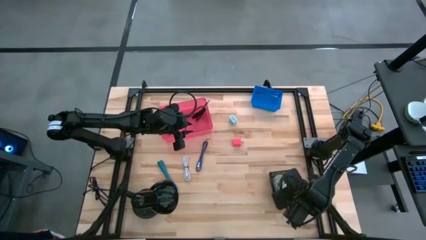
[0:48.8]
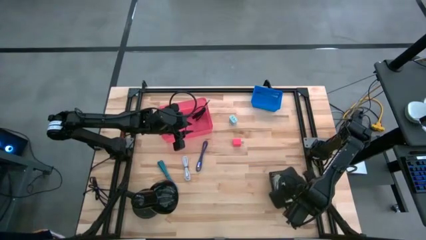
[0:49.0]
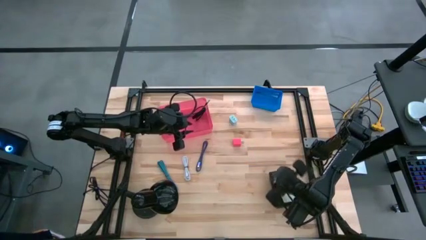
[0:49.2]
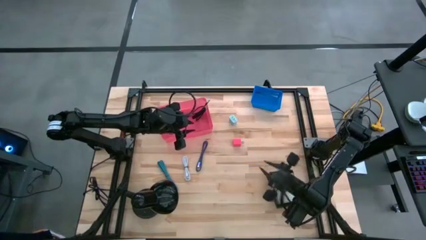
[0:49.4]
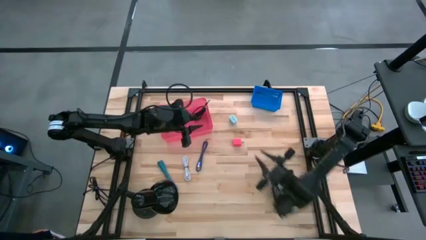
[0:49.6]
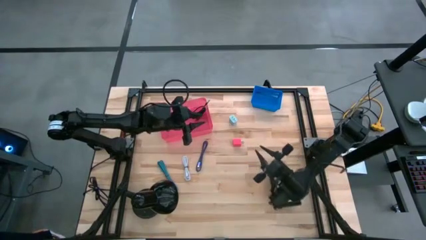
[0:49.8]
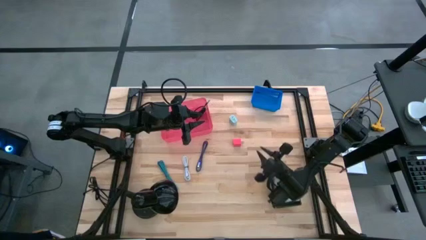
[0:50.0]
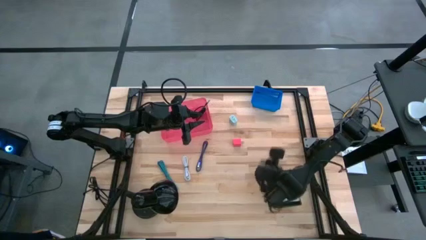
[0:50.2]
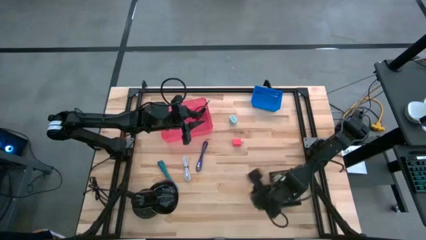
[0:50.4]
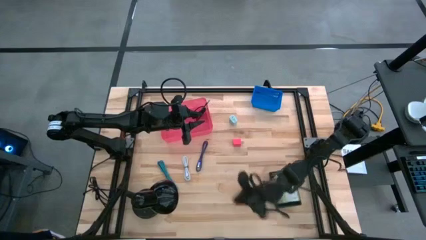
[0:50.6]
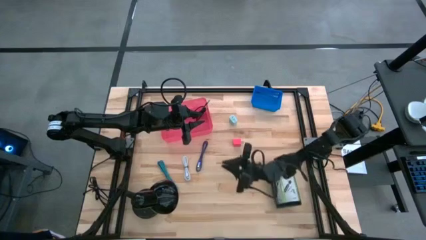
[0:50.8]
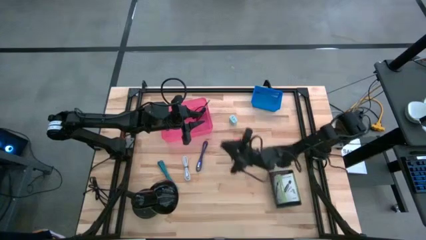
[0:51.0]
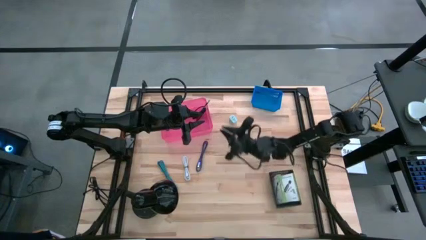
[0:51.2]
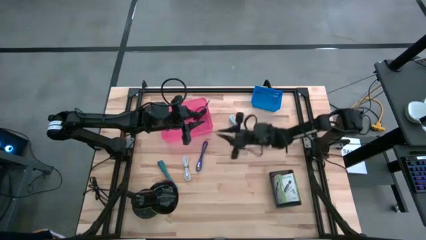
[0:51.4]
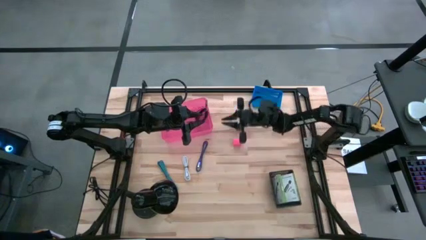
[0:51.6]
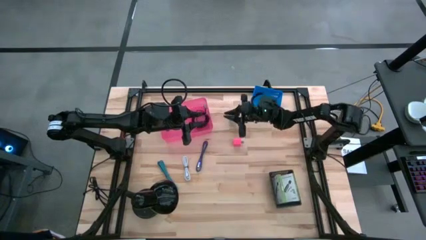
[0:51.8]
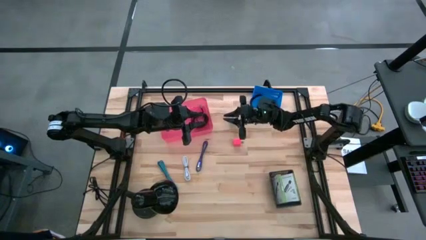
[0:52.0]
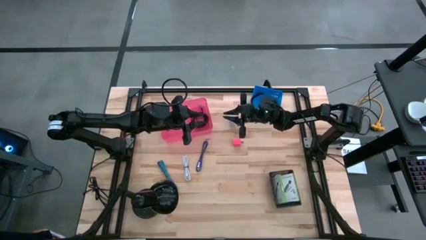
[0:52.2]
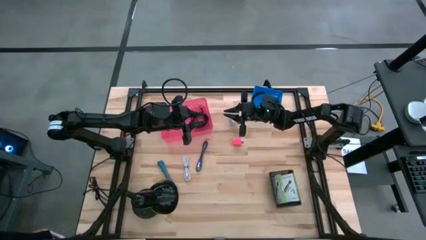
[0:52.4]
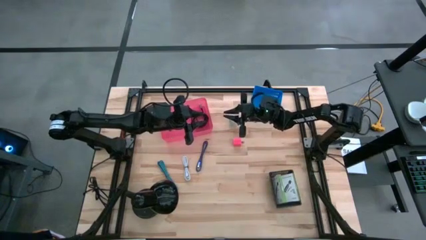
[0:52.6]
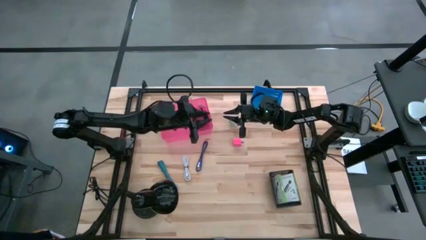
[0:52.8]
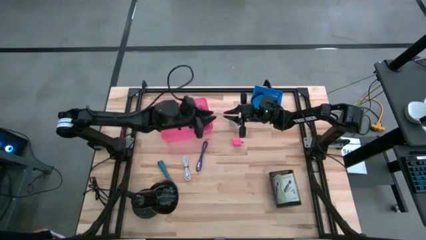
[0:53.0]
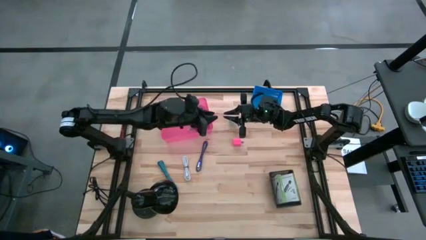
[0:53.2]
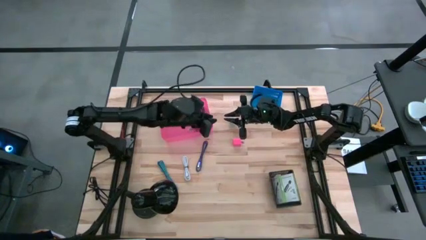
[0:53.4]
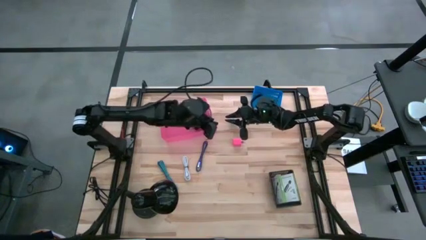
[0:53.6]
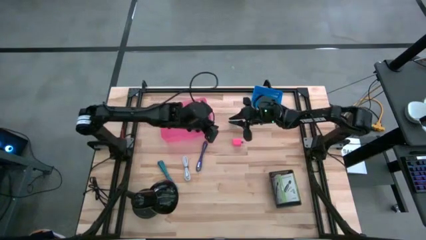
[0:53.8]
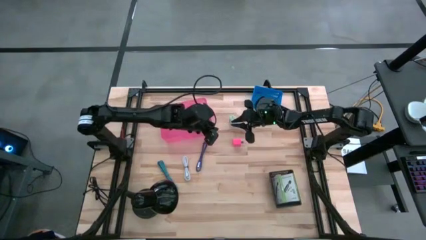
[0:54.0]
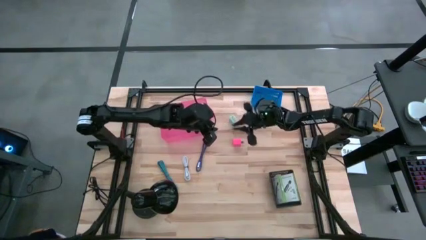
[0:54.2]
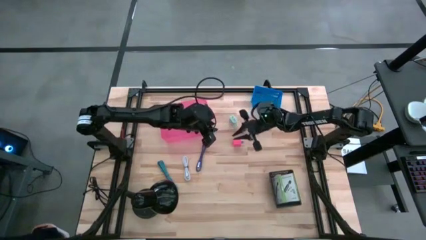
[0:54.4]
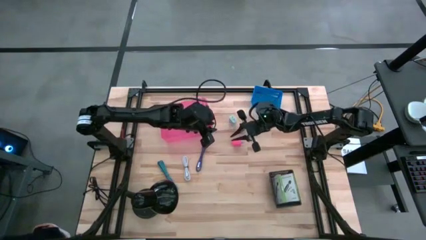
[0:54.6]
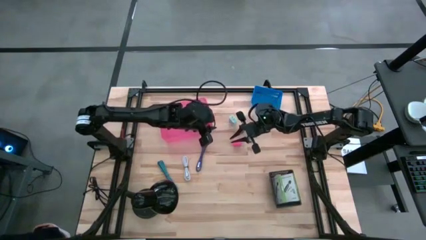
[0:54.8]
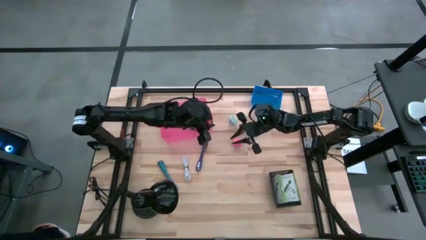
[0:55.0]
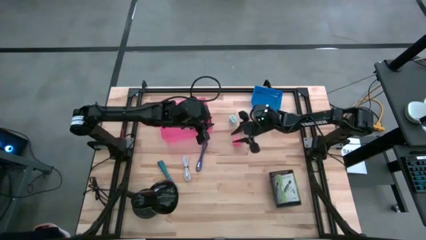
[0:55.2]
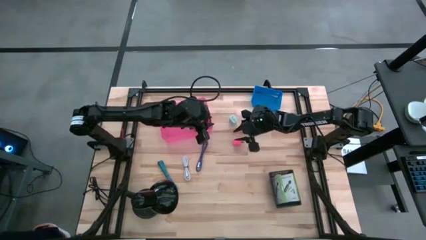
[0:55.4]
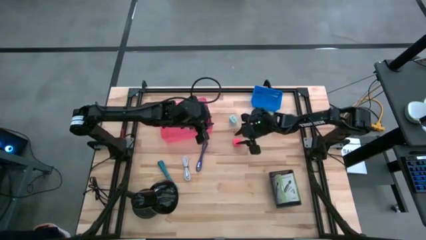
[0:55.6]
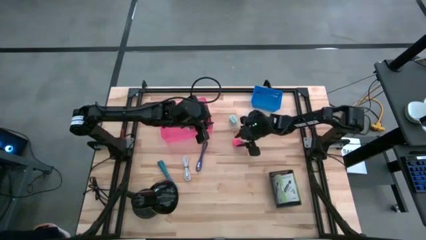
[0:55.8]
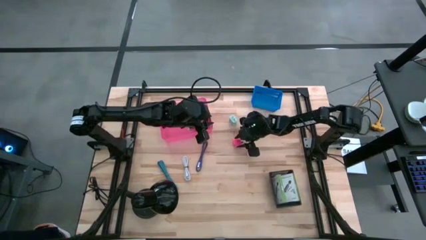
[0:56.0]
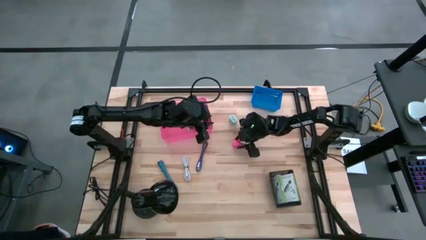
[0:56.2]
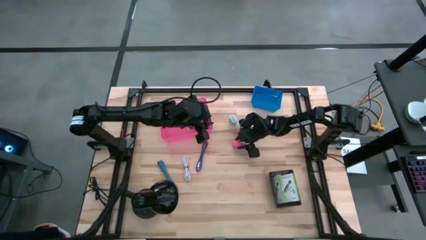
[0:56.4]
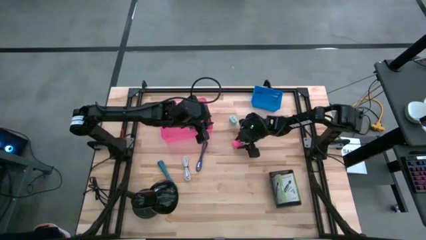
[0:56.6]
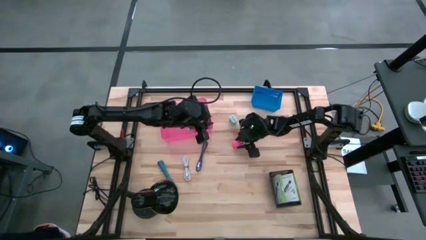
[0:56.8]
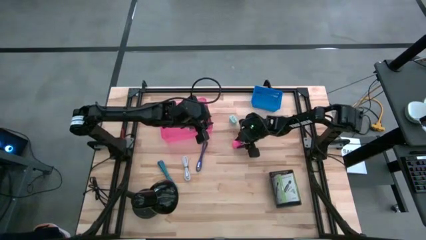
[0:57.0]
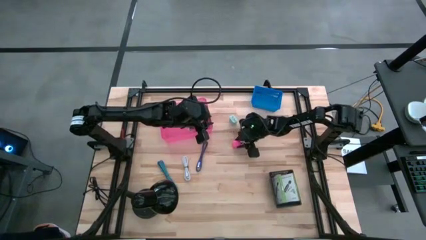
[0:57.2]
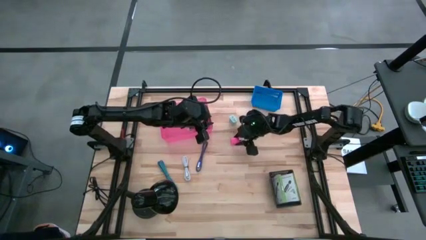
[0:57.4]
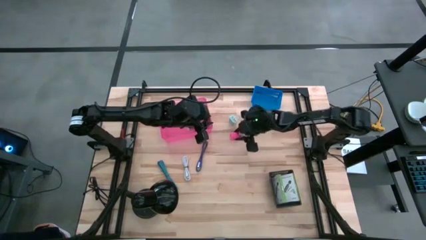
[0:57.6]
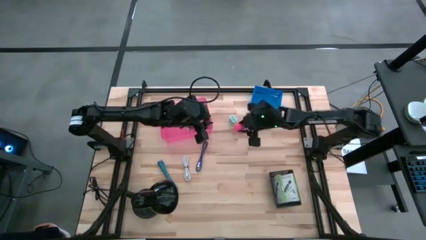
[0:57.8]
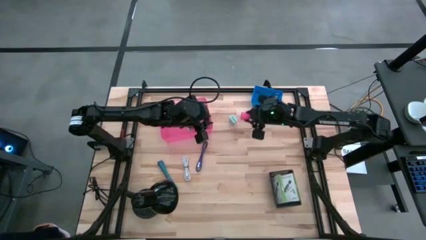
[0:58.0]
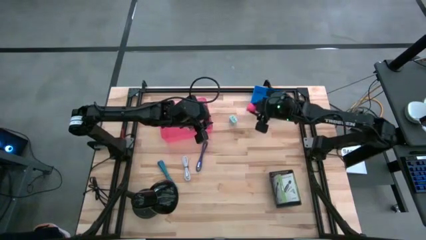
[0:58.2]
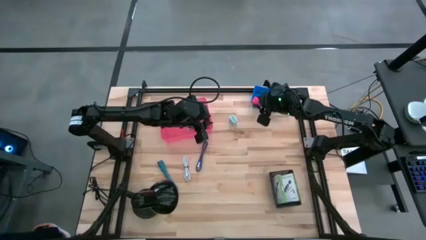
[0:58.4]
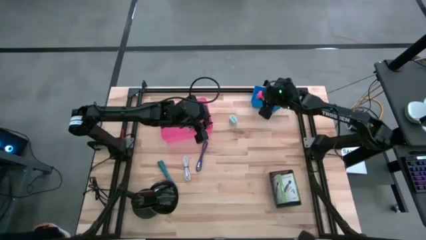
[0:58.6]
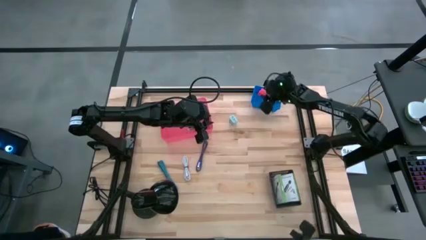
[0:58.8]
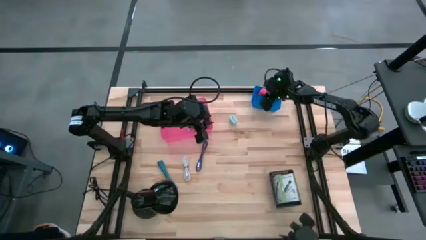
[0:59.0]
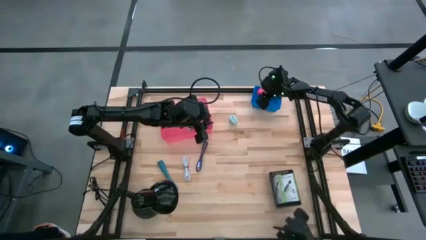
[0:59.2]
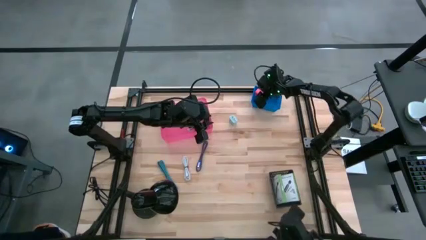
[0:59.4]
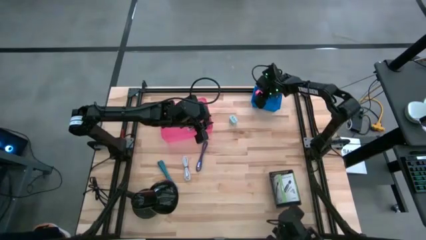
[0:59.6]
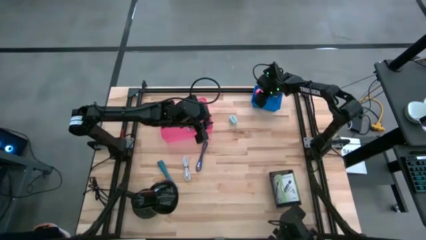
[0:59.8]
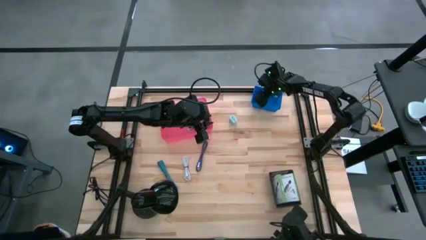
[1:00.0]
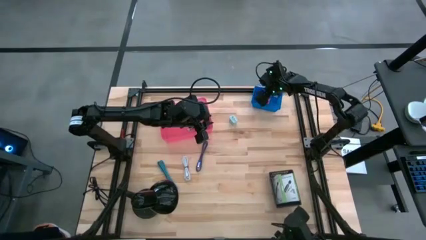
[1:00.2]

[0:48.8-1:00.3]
Task: Pick and place items into bin
Put the pink charger adaptor into the blue bin

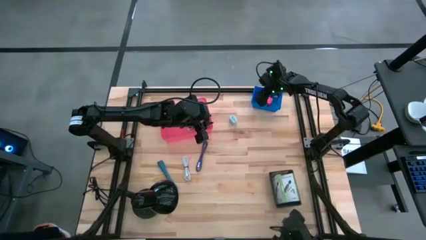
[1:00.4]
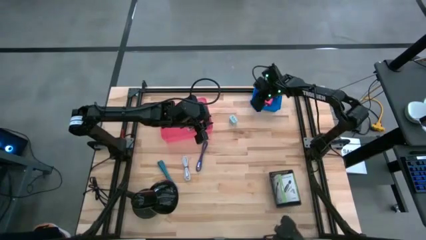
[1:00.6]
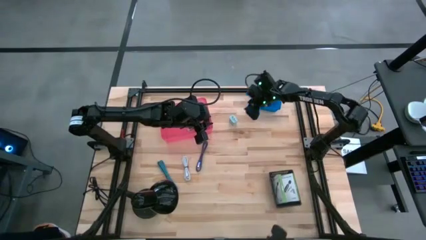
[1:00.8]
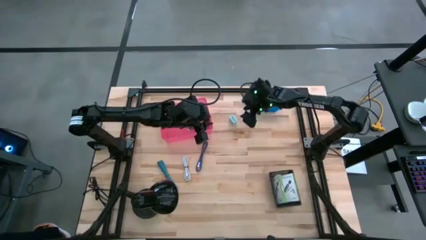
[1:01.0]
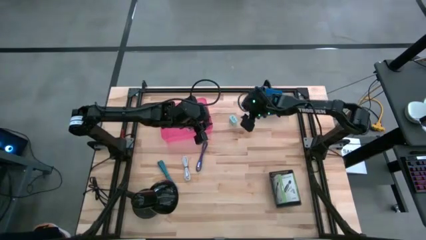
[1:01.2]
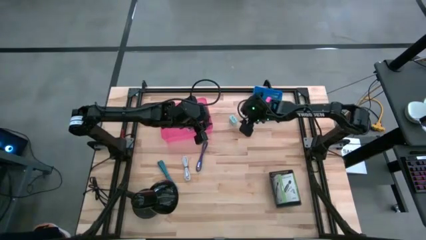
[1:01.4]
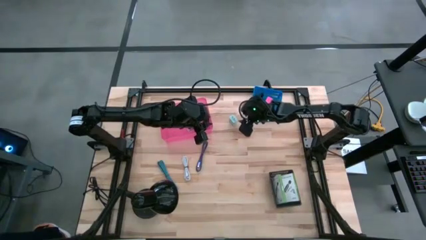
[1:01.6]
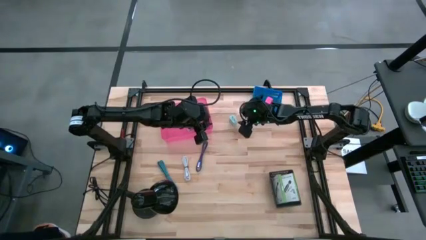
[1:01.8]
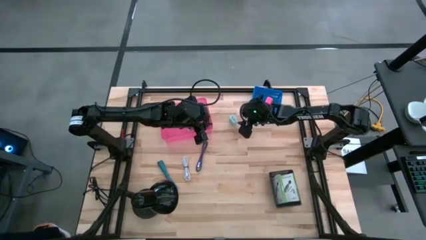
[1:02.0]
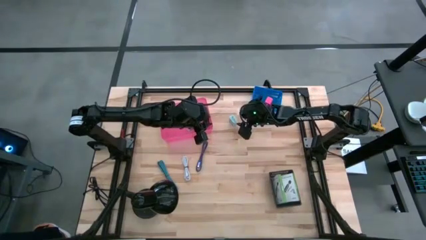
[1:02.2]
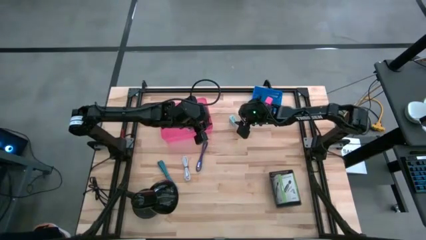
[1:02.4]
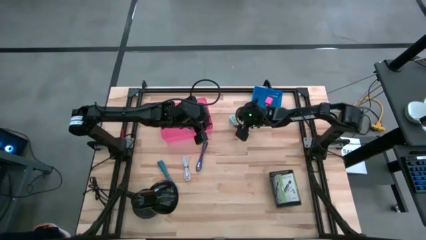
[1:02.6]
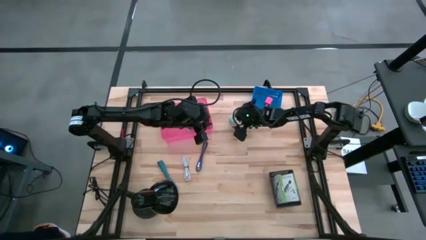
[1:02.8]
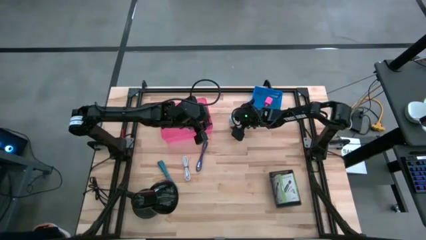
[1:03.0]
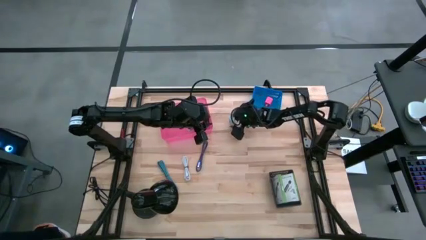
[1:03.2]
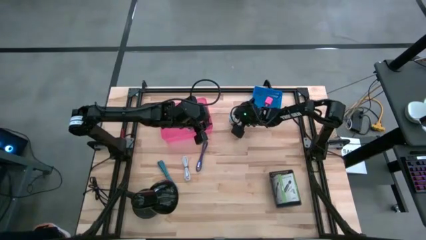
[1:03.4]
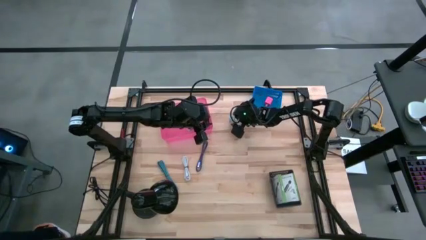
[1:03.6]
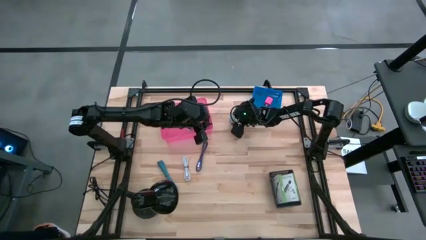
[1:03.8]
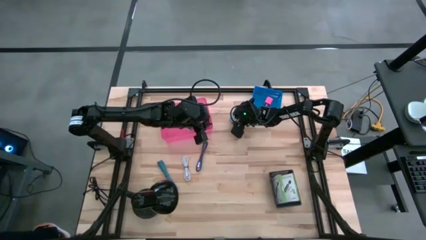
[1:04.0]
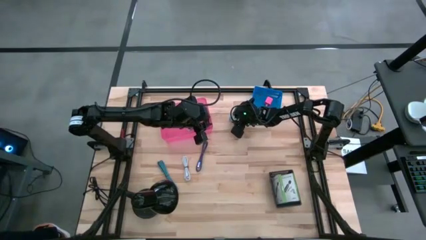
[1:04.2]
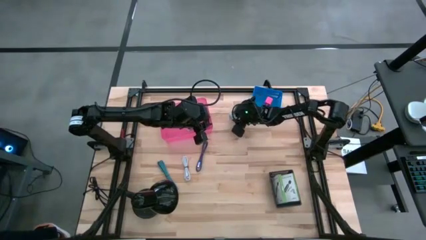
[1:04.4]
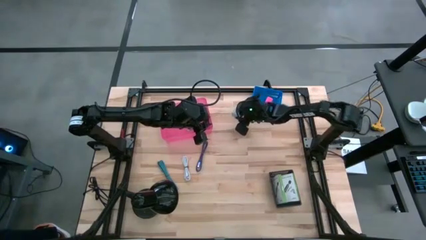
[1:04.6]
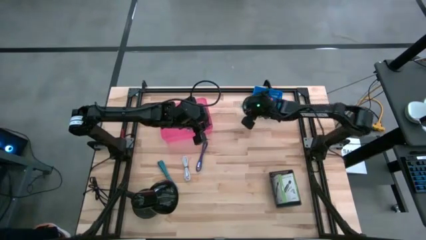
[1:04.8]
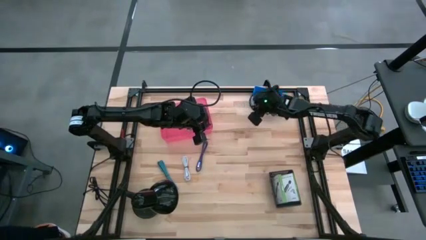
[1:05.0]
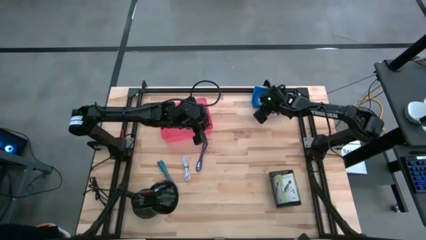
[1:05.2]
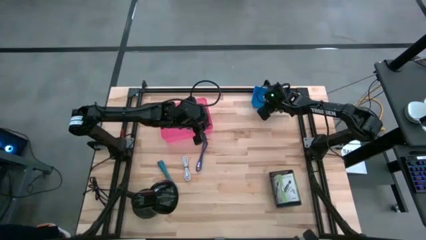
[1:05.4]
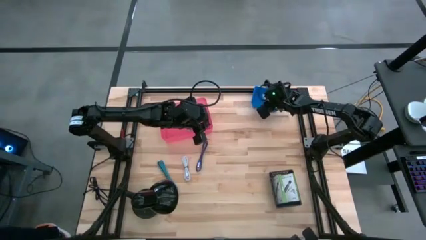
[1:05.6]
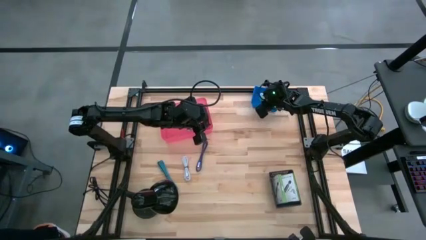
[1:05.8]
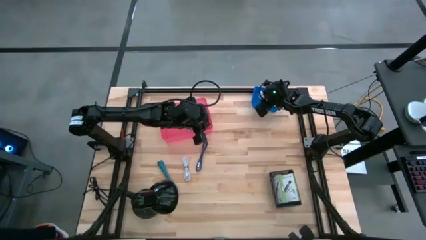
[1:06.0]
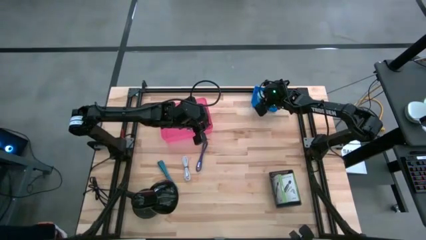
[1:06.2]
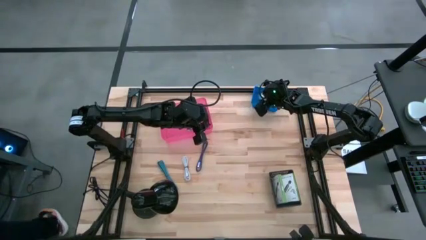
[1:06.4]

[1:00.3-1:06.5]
Put the white charger adaptor into the blue bin
